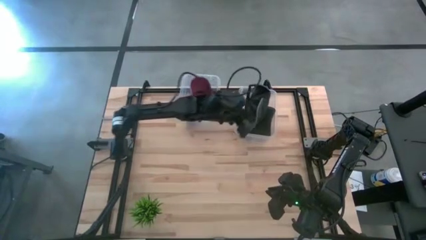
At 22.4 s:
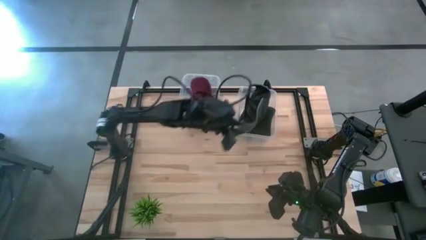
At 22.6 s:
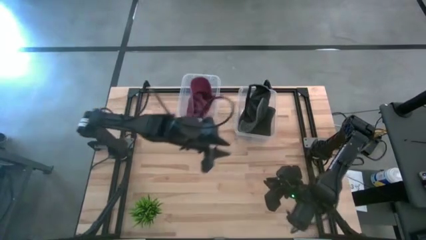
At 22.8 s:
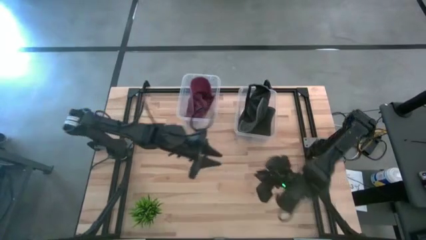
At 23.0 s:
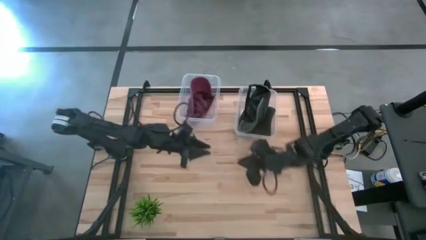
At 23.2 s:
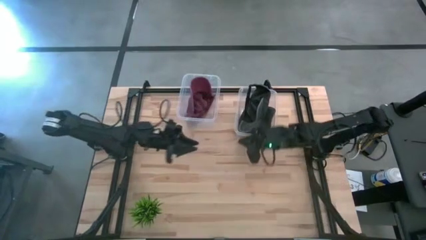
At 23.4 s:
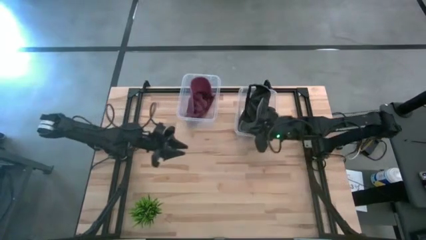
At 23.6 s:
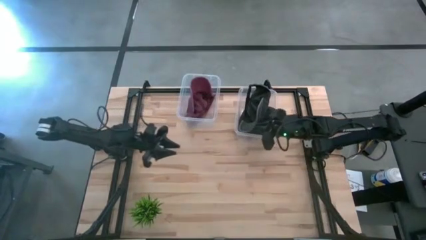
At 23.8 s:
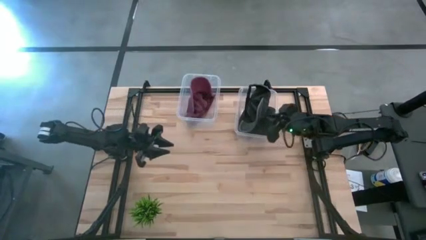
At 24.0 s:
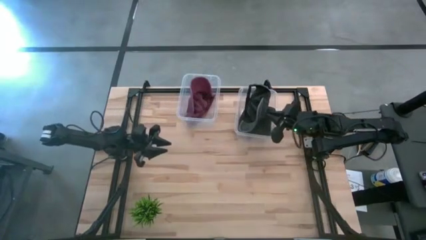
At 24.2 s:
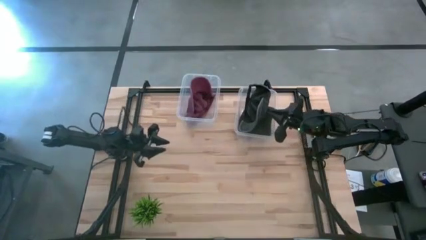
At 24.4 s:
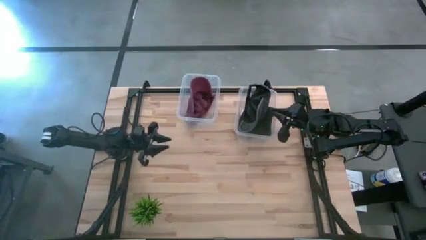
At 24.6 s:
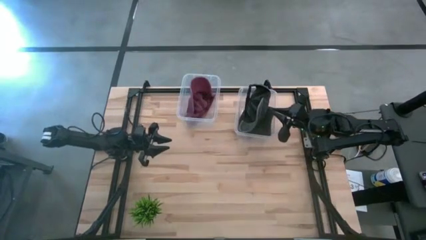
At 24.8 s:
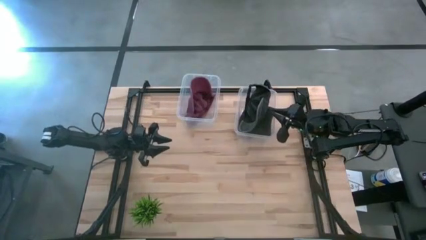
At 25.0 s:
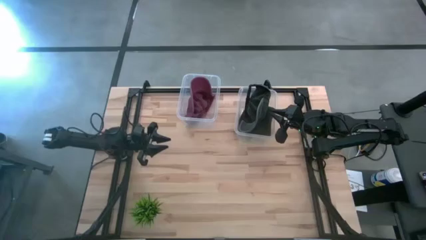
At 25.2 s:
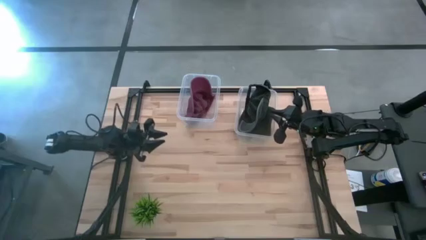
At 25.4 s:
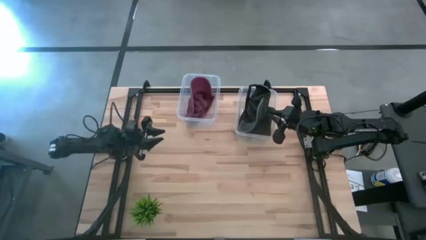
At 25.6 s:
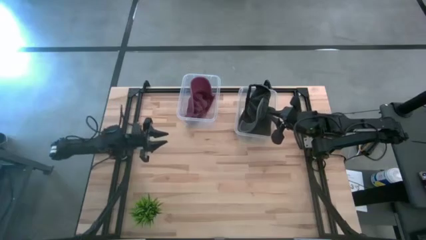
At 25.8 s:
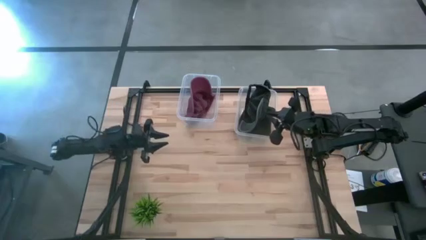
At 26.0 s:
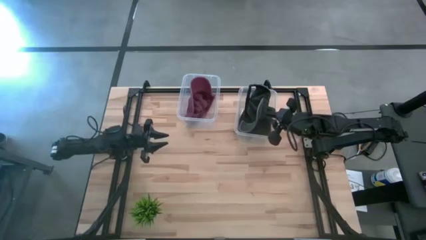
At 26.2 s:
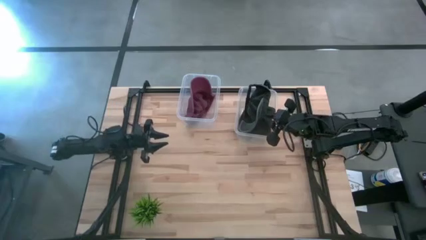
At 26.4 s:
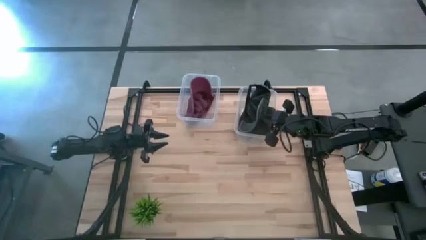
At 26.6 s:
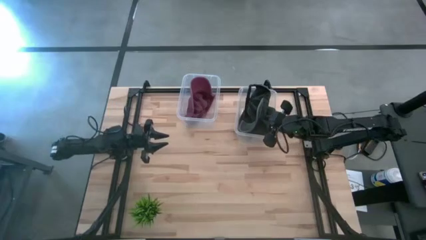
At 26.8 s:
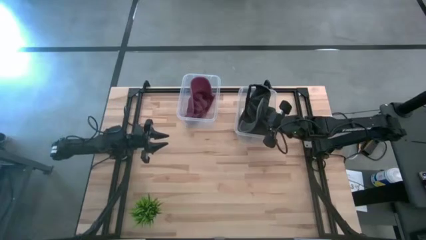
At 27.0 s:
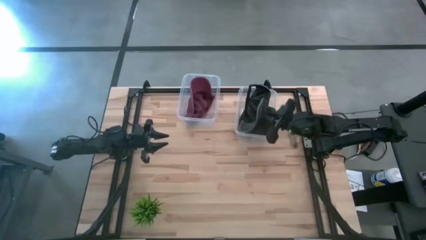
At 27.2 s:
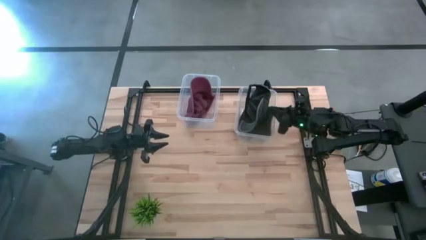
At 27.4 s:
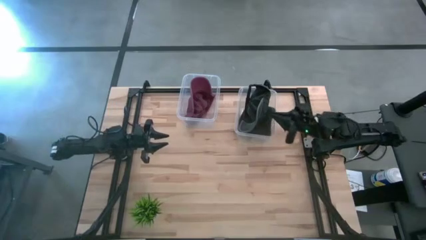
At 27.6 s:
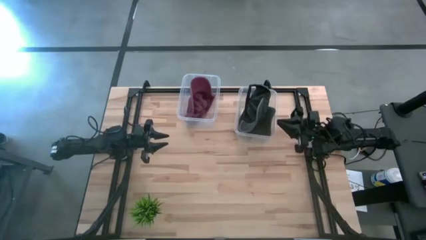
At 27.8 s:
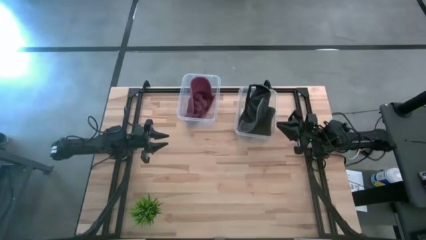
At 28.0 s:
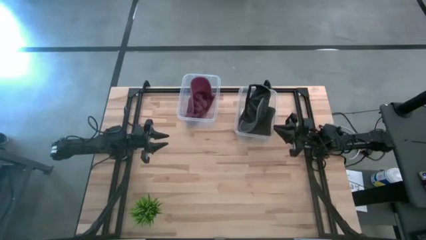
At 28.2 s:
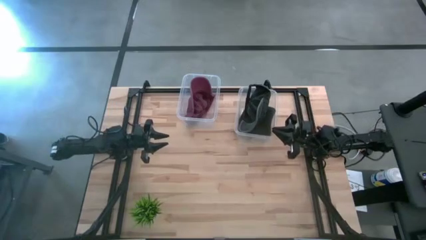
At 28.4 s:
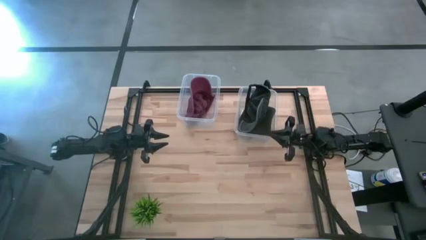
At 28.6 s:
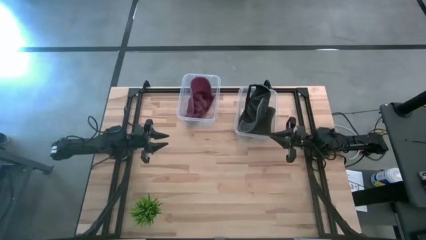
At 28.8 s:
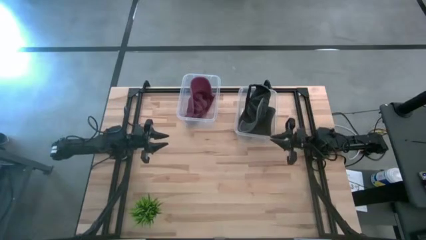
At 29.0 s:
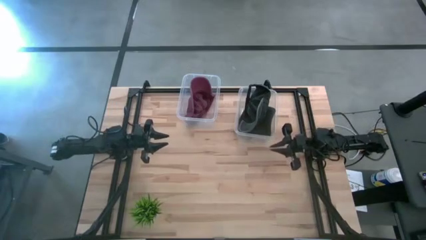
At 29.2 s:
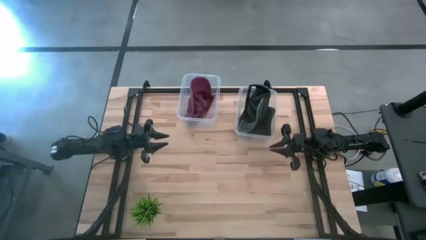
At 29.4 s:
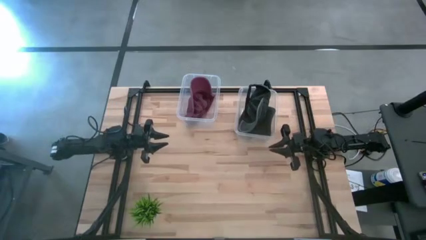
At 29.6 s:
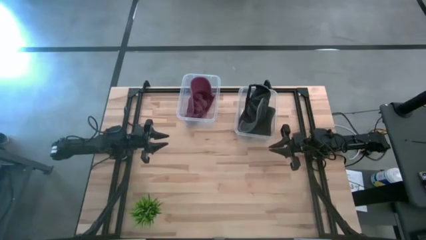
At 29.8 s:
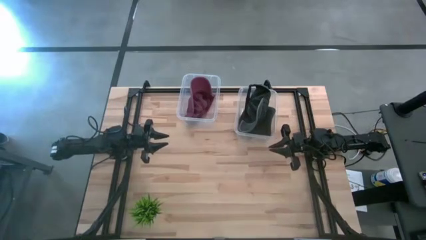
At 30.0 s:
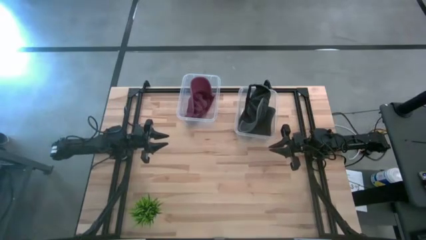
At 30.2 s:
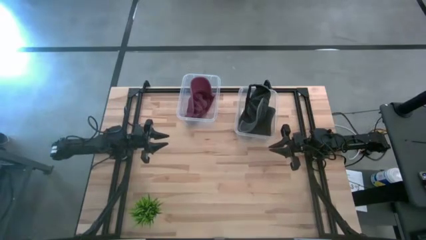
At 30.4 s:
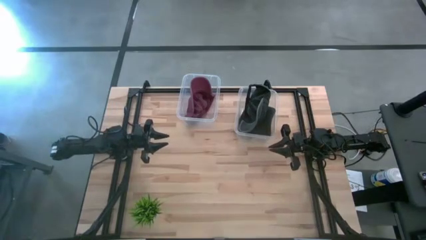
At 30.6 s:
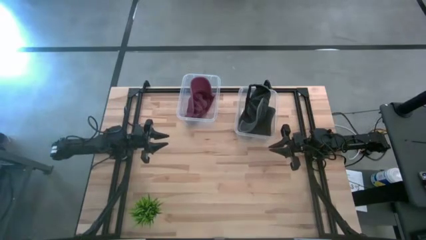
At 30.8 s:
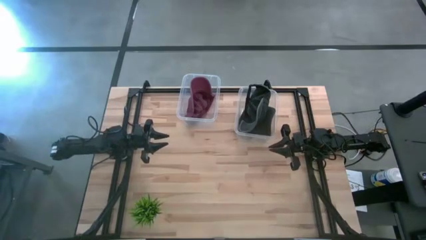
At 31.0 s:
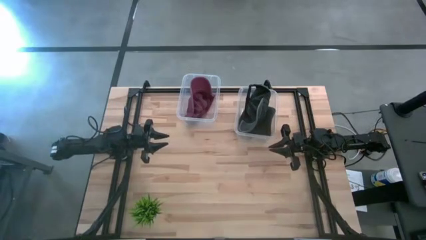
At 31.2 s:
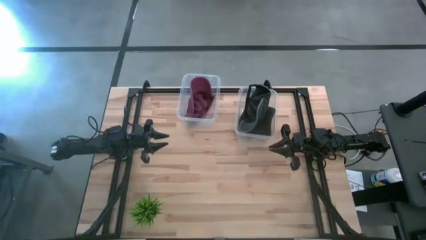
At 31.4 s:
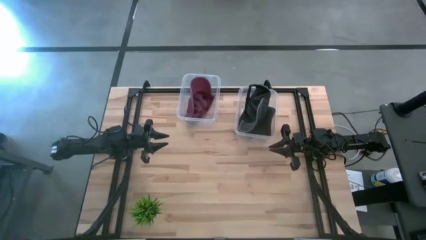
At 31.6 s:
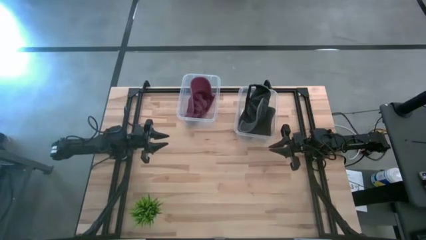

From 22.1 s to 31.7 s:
Task: Pick & Place hat
Return to Home Position
